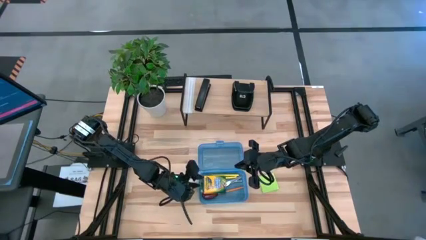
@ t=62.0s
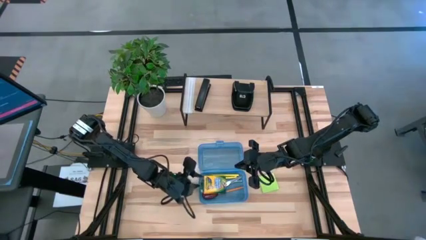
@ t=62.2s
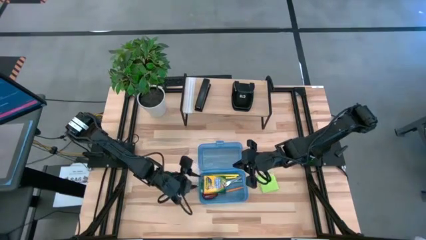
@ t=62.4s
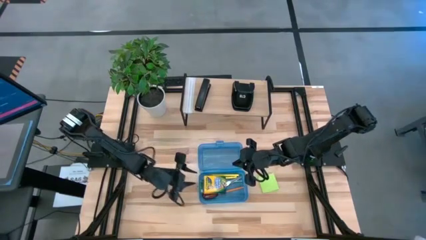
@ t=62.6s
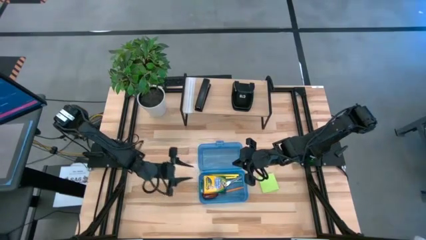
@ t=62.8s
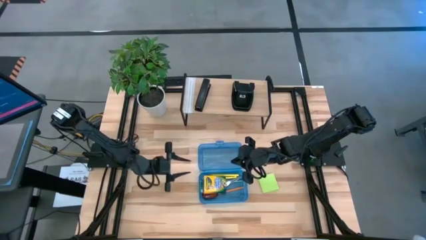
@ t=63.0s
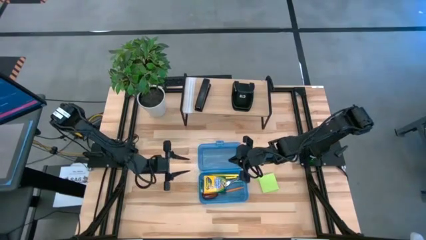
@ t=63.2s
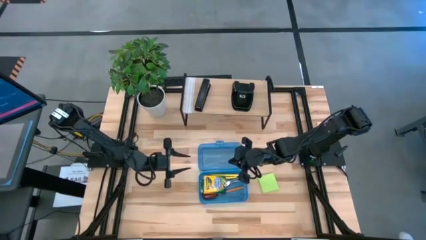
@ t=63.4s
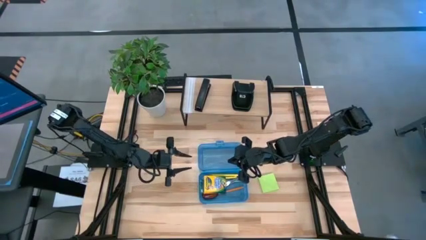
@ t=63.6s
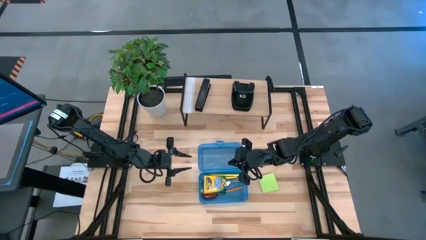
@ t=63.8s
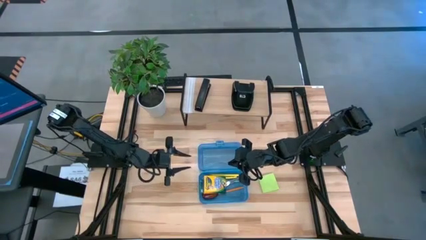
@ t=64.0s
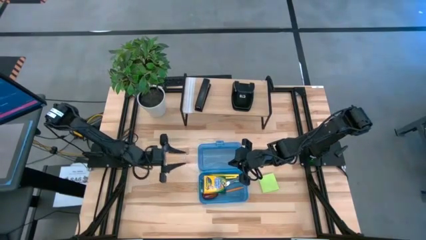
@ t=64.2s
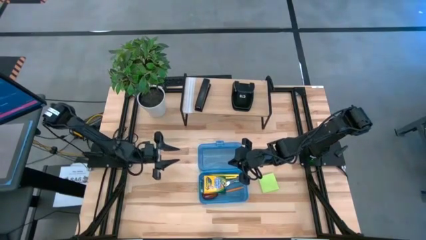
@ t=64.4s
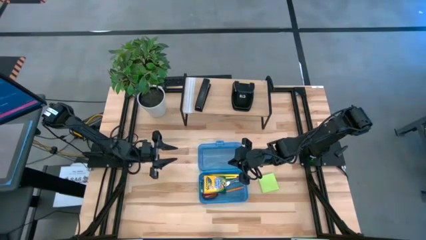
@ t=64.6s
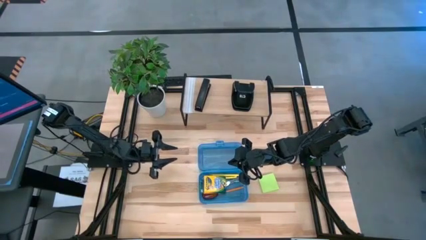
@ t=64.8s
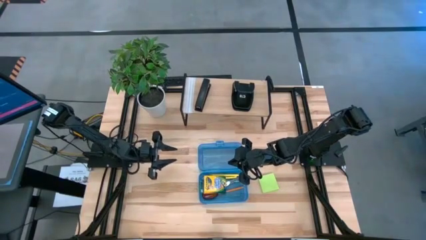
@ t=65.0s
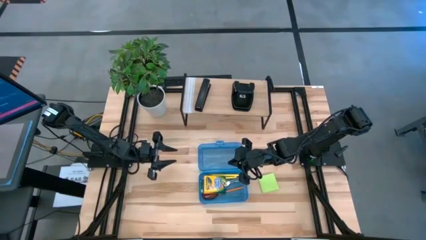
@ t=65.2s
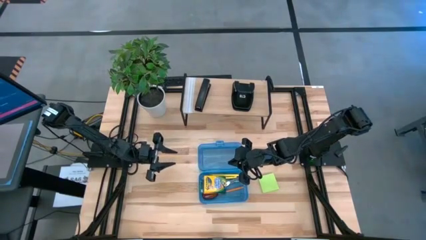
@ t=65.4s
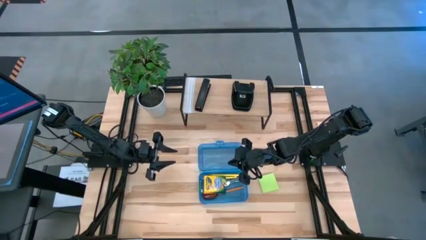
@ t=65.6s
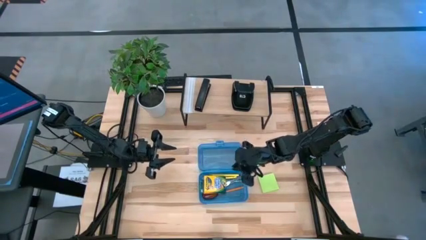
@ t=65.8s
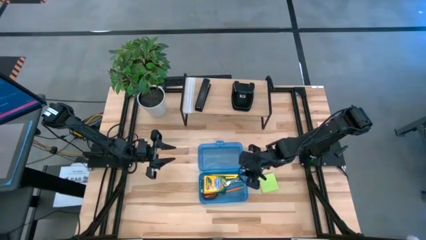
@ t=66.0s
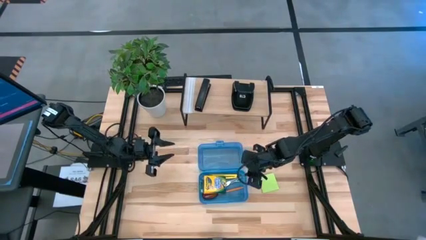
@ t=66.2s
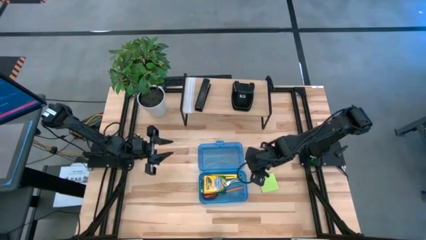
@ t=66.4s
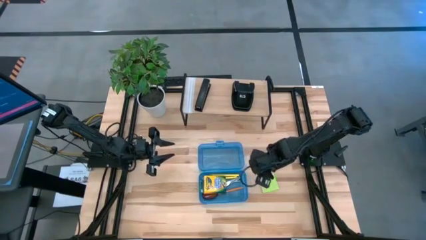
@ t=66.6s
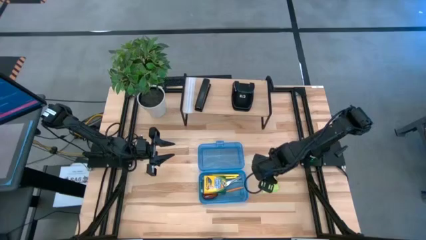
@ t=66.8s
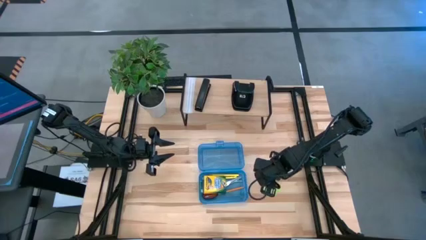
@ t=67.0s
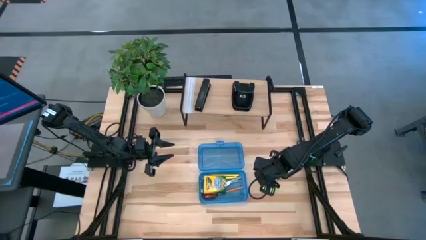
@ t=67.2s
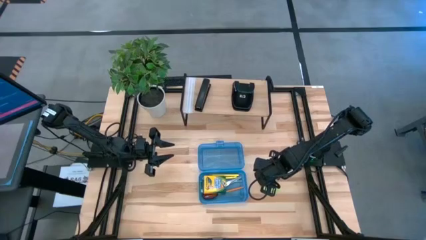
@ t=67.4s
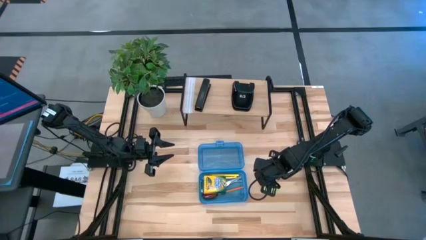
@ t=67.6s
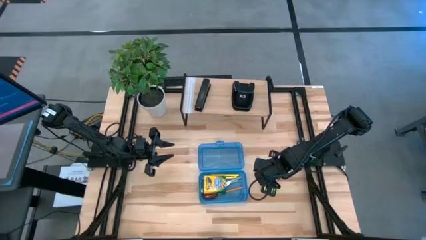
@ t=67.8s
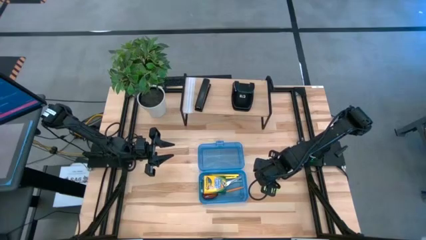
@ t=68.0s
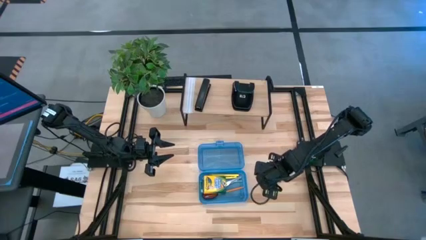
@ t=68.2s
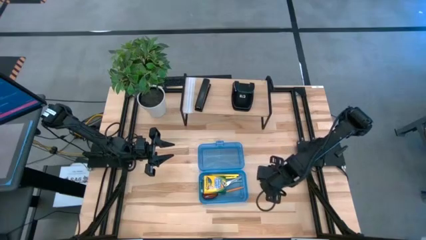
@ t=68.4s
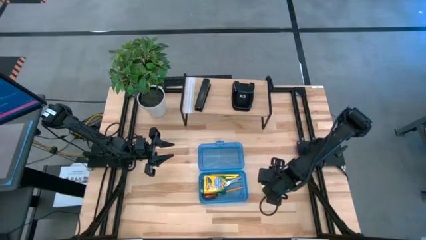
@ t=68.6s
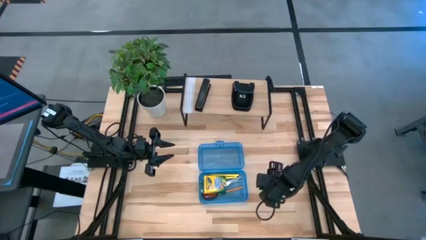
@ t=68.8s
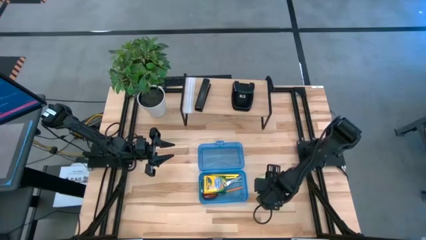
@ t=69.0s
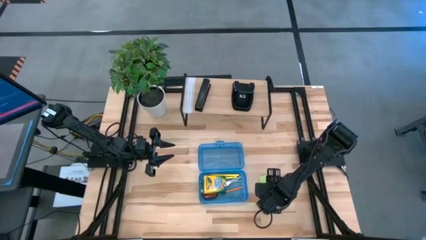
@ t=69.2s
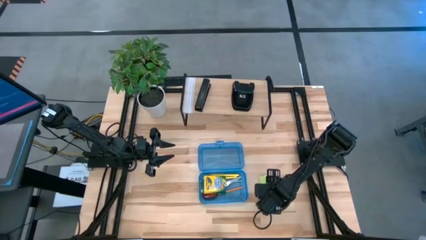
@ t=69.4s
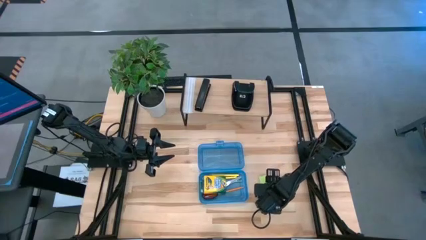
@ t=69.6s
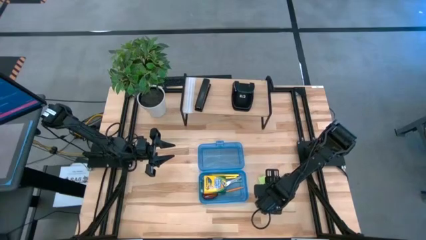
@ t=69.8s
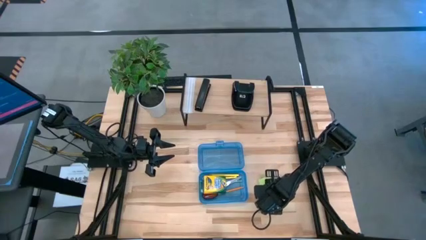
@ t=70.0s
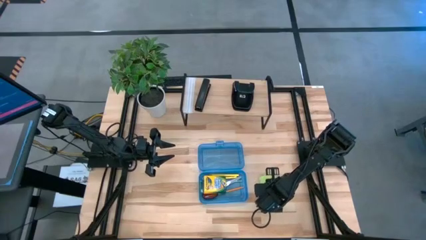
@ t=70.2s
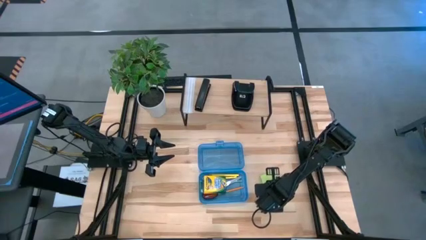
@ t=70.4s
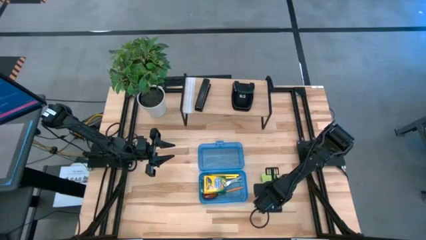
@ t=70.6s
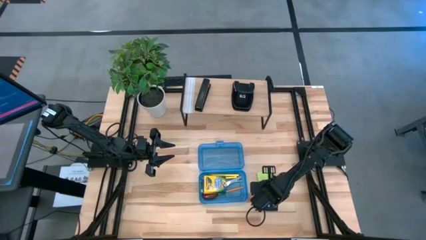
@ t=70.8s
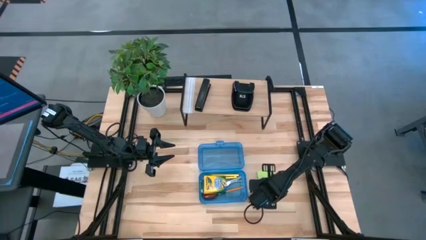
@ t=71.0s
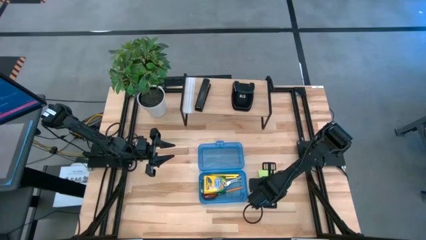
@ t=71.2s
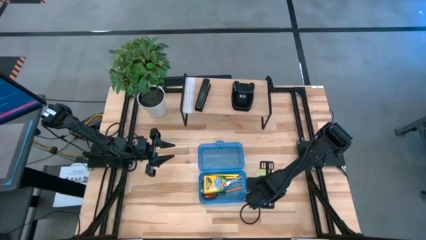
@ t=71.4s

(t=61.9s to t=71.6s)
Task: Pack school essentials
Put the green sticky notes into the blue supply box

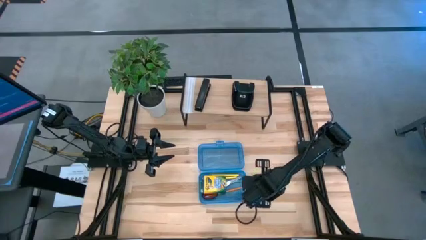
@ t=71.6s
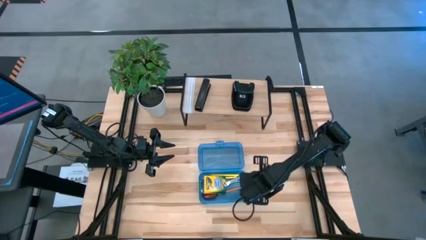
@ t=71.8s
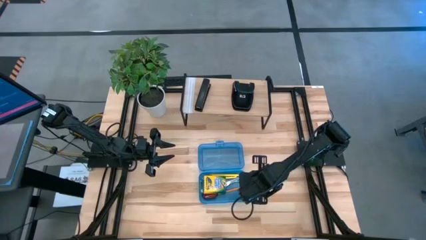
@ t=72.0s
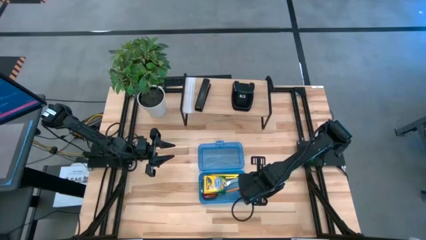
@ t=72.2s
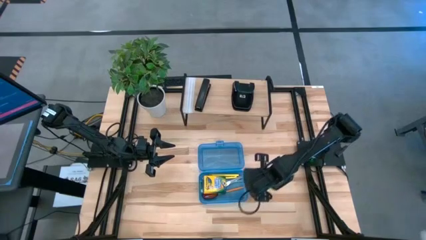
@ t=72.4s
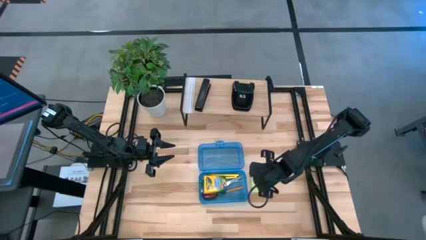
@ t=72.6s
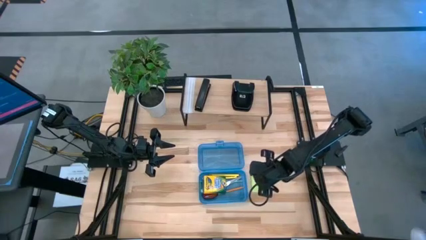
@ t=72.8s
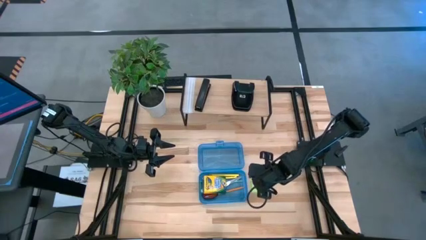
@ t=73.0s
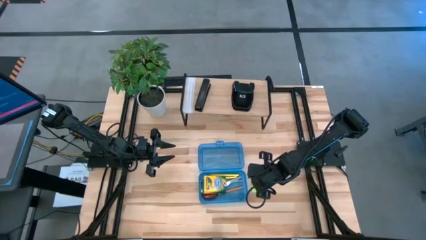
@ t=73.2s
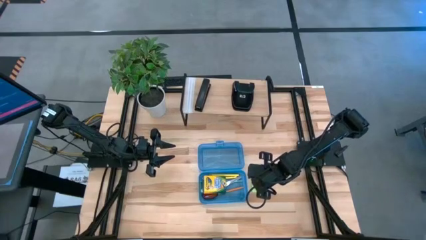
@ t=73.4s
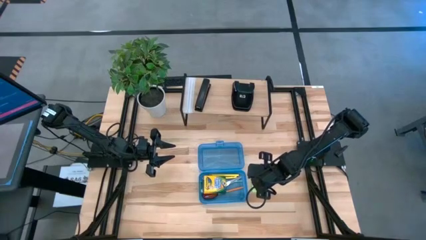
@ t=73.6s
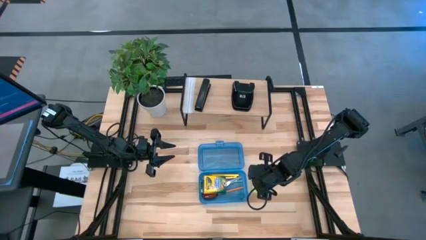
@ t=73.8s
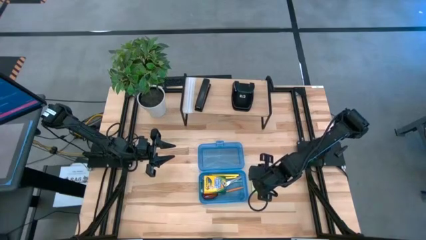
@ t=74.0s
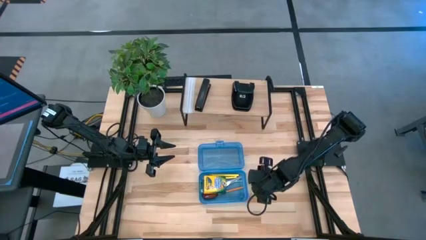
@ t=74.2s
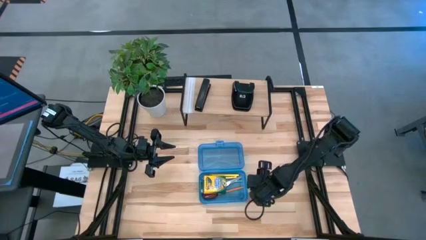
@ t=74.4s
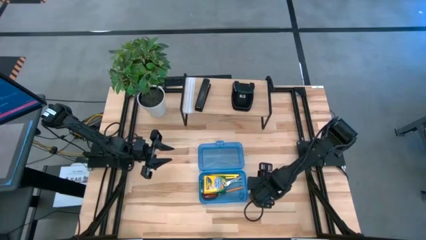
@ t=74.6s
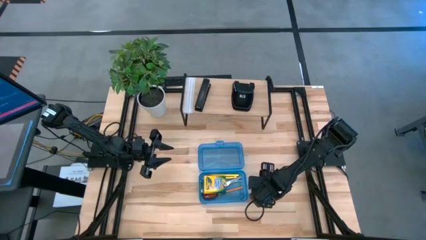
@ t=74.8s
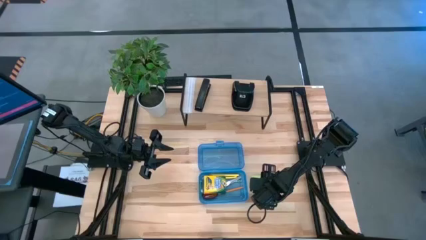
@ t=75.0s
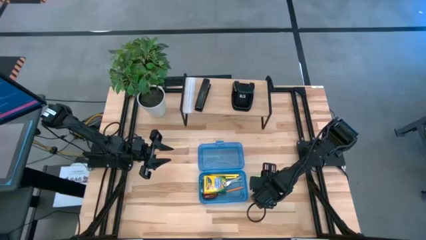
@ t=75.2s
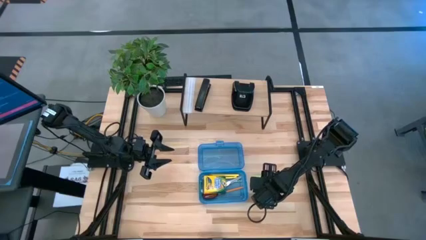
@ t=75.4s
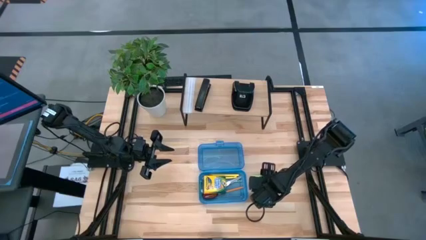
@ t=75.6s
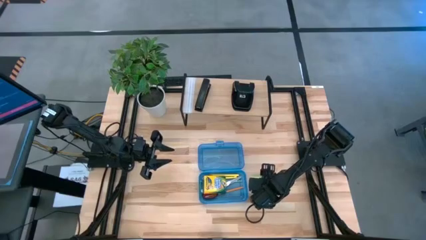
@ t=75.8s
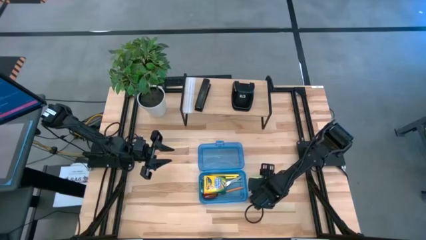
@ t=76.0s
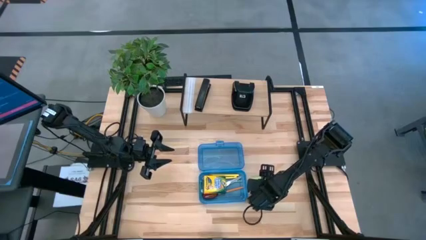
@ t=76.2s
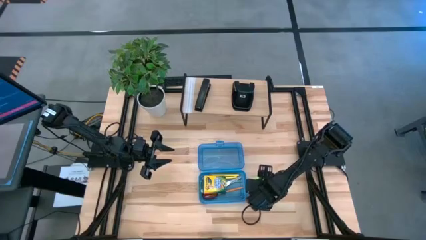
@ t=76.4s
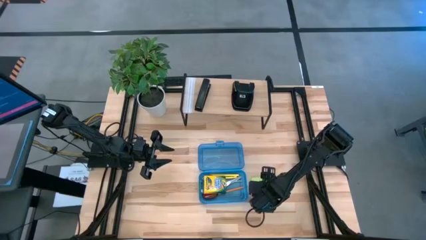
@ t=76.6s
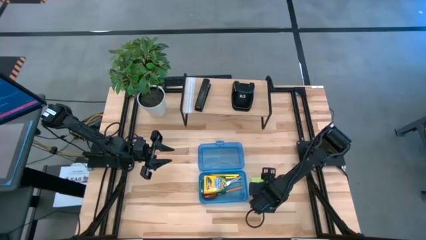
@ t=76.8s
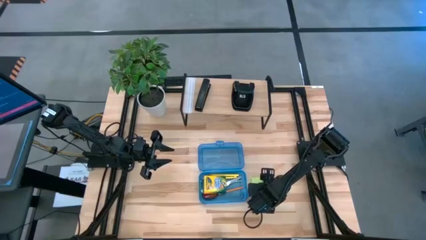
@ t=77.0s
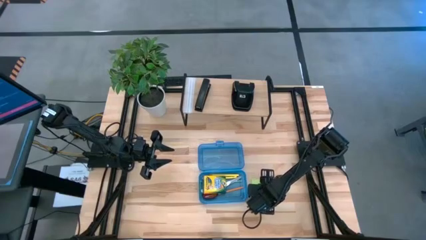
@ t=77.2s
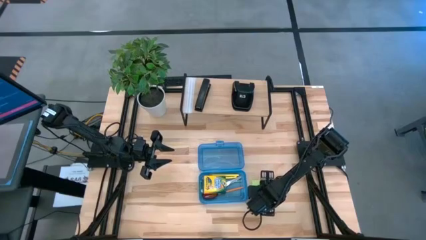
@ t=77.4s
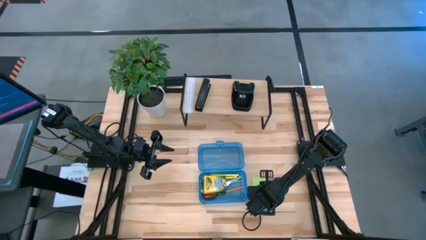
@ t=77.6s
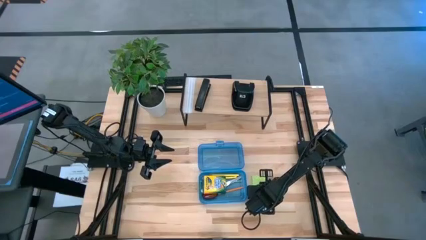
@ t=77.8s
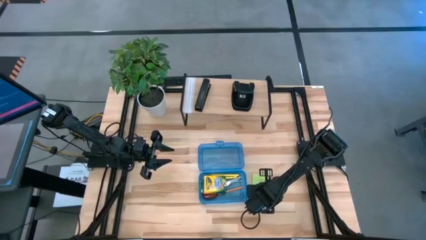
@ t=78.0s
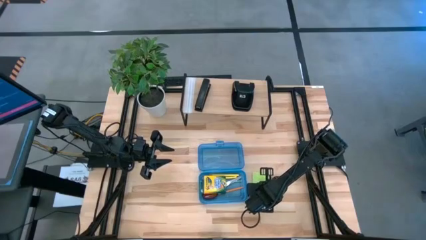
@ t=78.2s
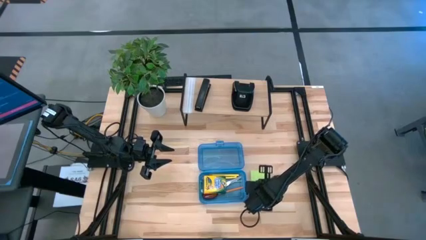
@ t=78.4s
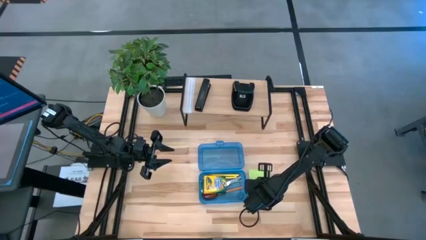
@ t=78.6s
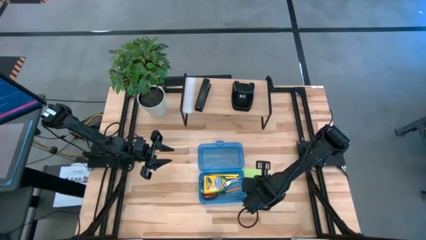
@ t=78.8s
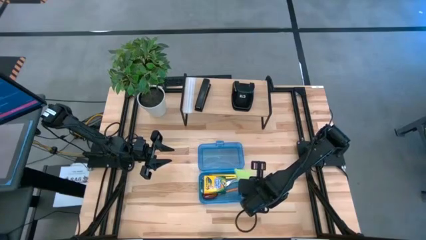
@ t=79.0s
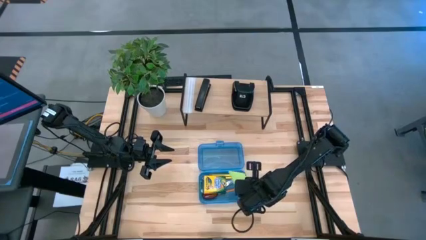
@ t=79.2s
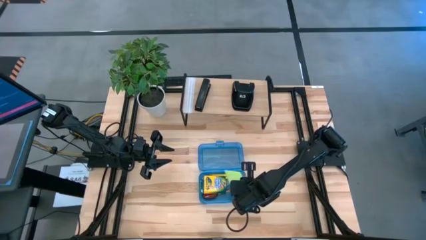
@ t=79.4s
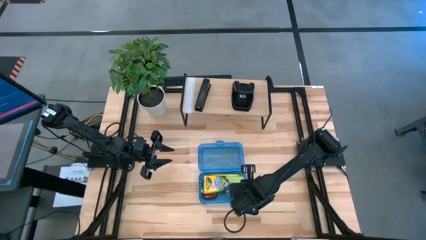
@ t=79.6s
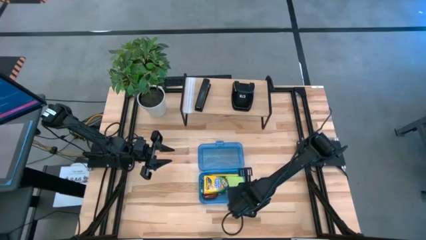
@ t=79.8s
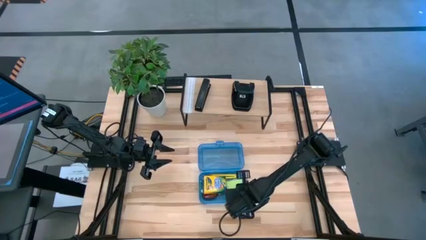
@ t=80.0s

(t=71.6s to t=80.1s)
Put the green sticky notes into the blue supply box
